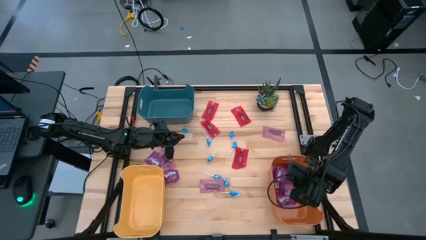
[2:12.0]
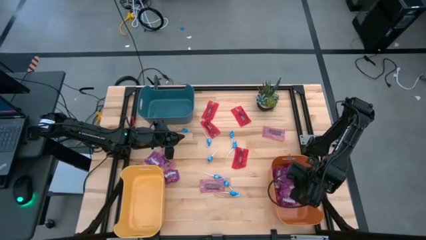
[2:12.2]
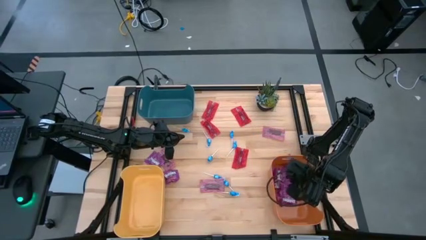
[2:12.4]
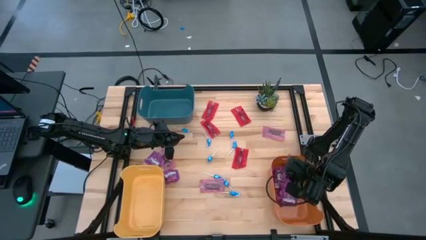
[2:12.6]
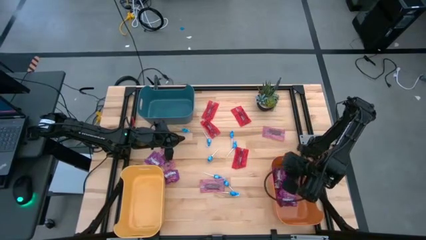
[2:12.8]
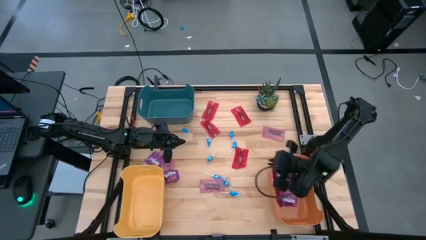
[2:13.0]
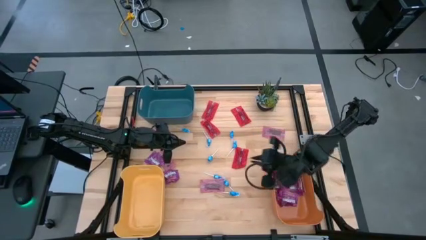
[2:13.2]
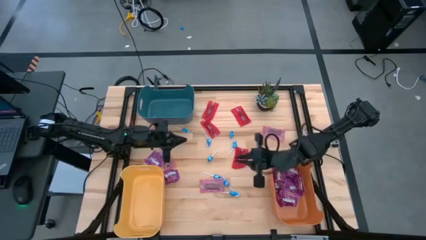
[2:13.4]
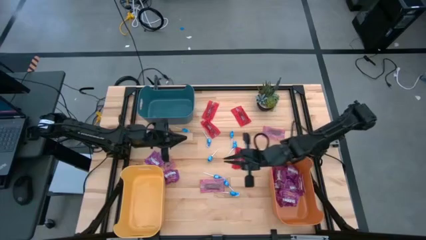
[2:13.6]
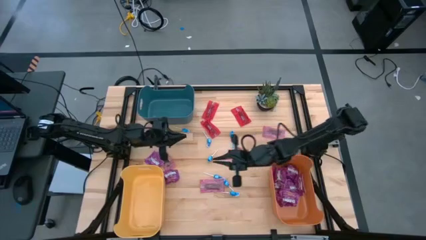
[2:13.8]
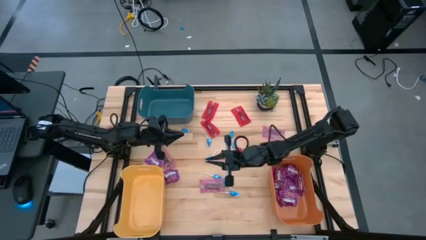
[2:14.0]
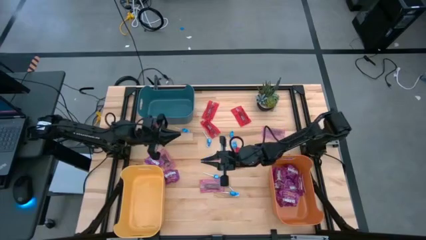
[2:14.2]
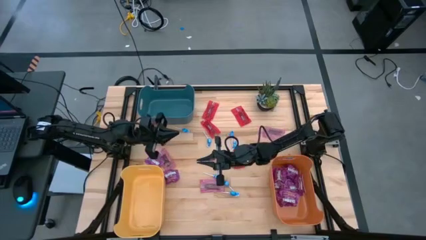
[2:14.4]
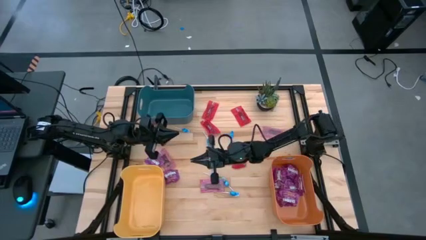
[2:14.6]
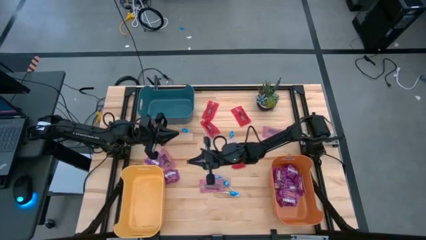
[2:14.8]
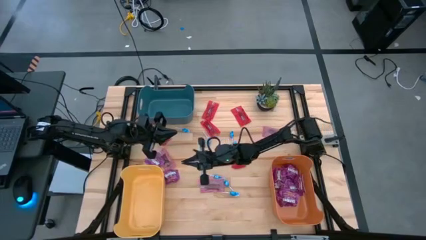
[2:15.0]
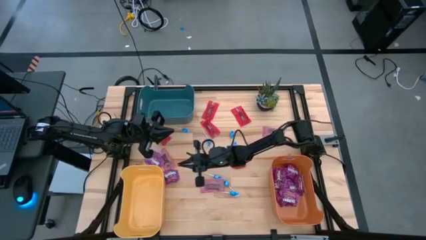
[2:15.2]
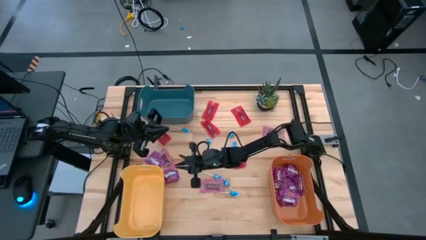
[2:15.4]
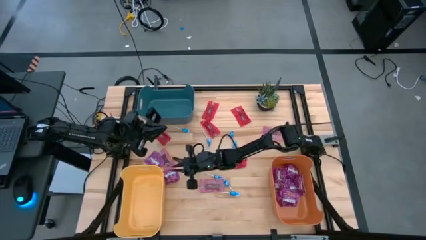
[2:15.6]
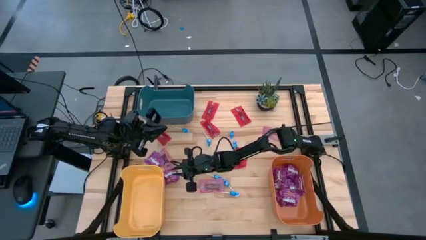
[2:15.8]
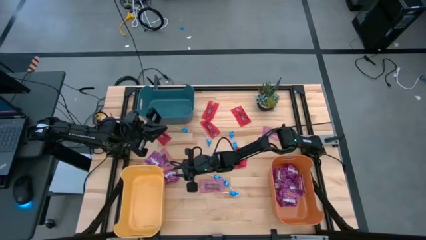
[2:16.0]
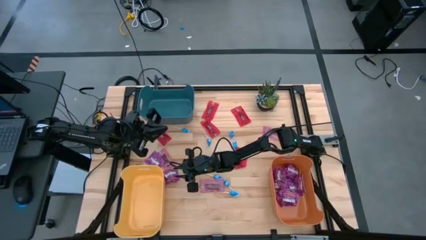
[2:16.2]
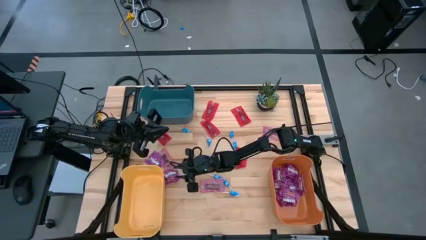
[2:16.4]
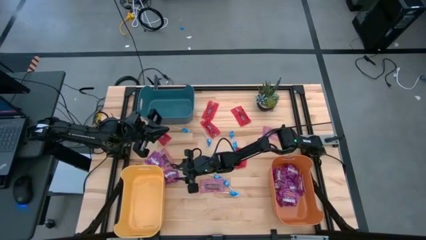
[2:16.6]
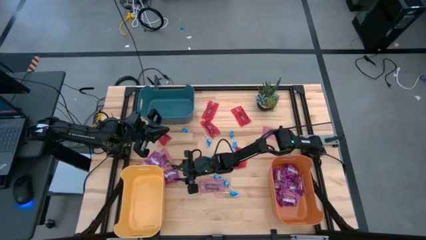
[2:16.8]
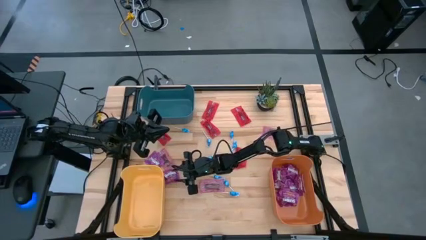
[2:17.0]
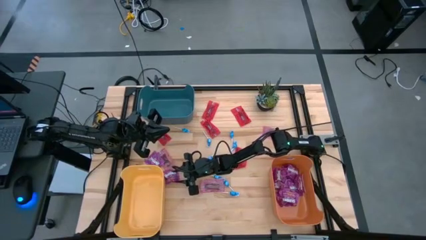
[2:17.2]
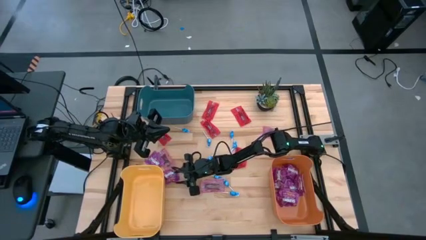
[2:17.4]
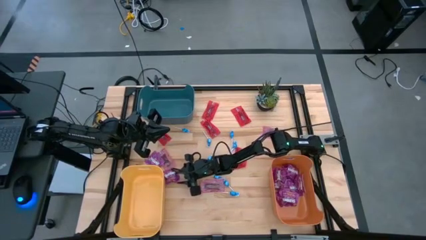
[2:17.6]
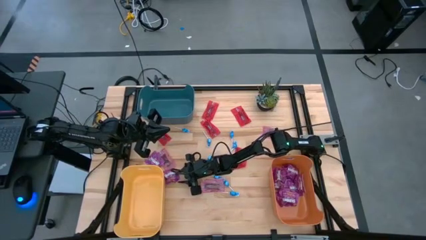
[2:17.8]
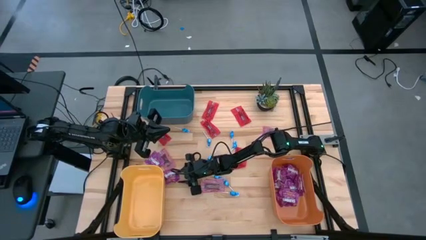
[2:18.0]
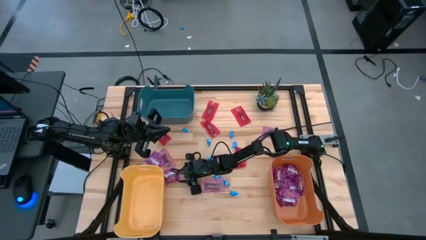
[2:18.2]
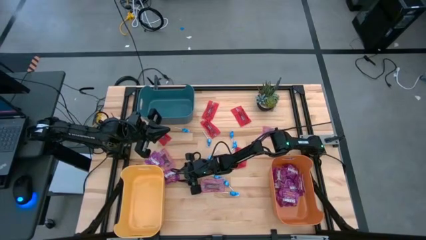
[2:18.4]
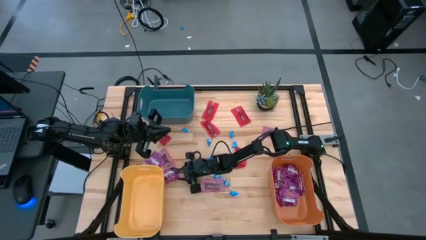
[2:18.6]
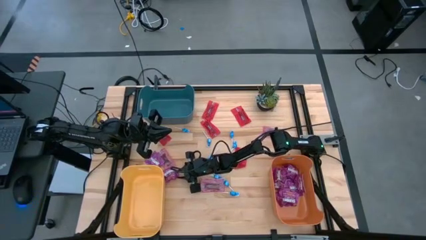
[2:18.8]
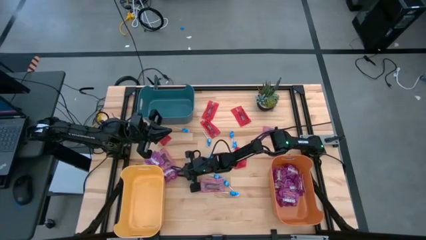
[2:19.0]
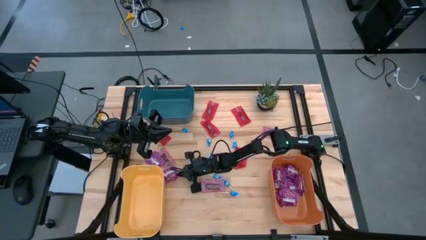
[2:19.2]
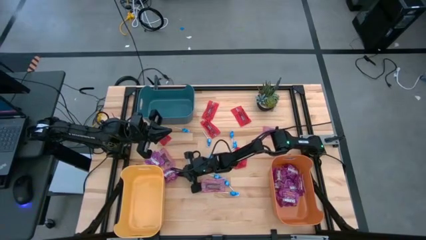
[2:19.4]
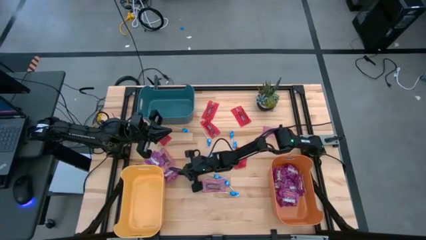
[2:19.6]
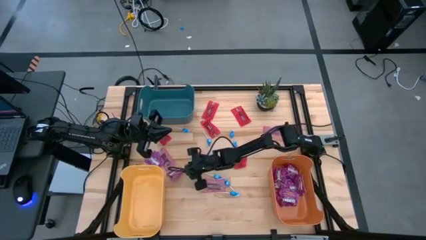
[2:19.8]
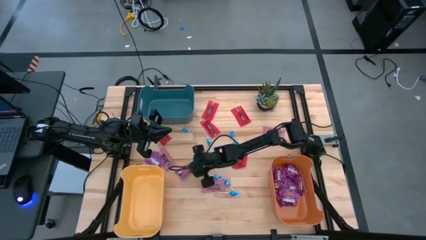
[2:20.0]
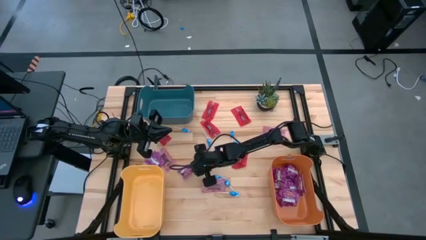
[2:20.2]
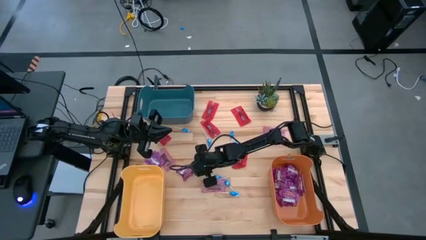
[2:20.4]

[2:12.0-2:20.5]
Task: Sort candy
Put the purple candy into the orange bin

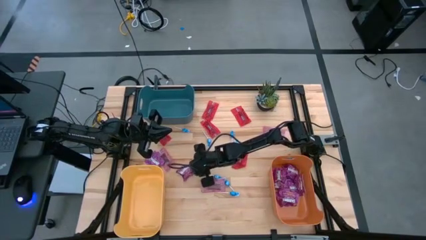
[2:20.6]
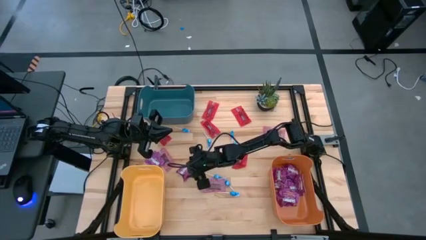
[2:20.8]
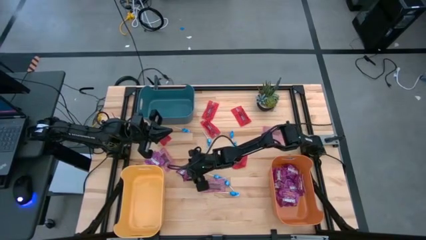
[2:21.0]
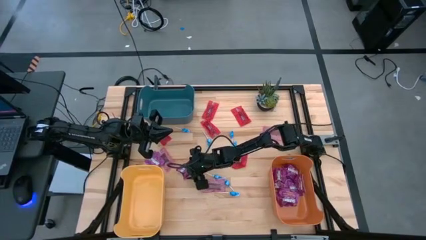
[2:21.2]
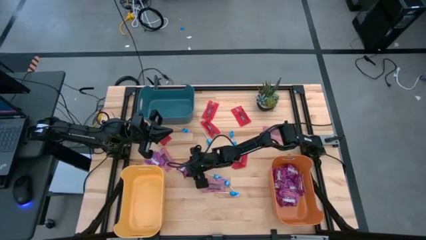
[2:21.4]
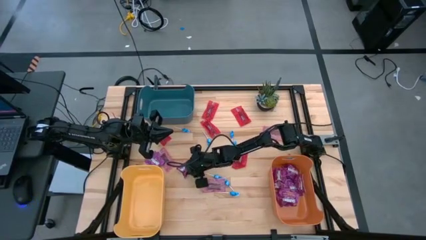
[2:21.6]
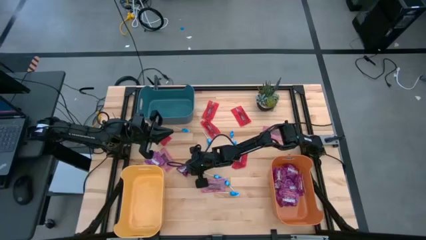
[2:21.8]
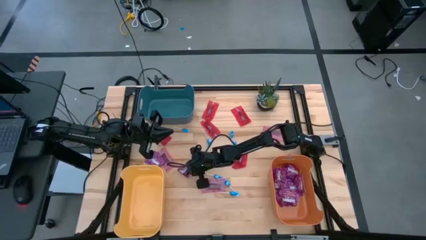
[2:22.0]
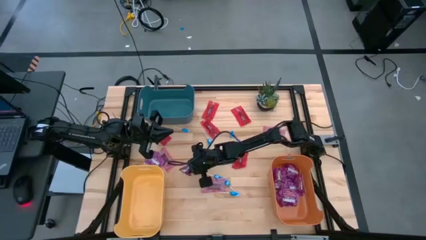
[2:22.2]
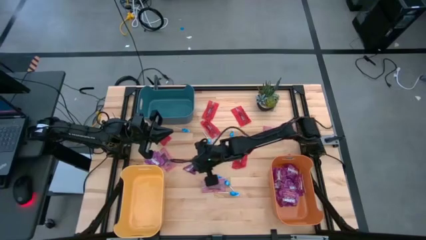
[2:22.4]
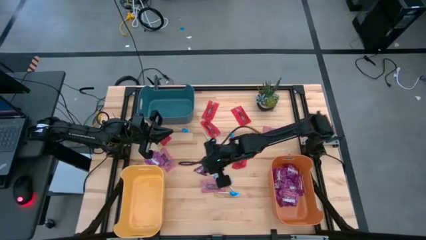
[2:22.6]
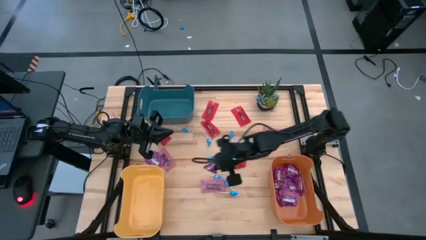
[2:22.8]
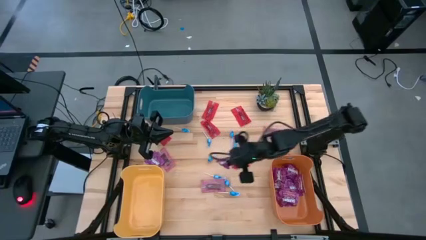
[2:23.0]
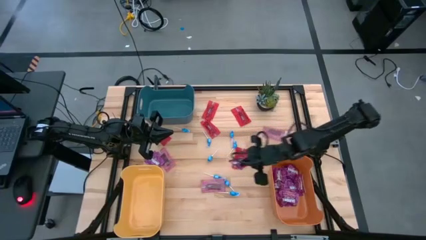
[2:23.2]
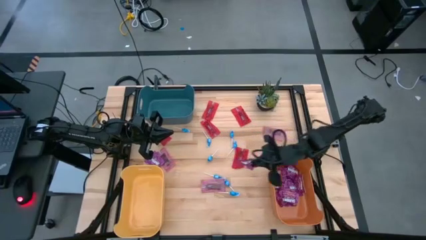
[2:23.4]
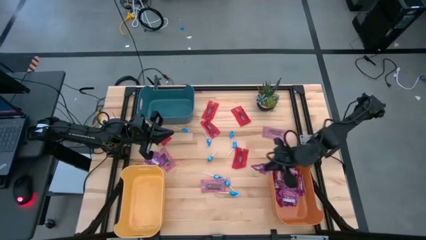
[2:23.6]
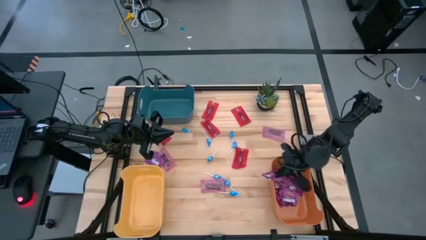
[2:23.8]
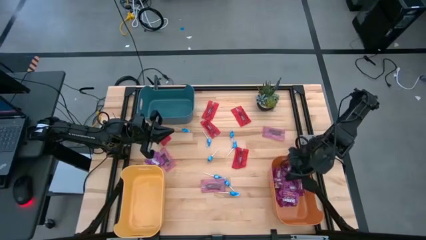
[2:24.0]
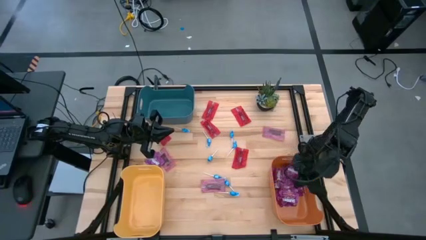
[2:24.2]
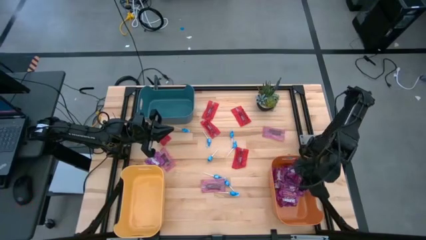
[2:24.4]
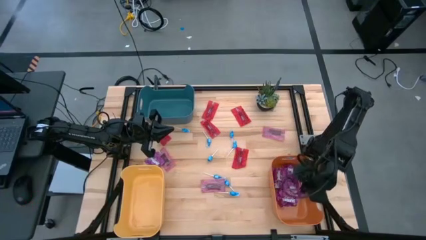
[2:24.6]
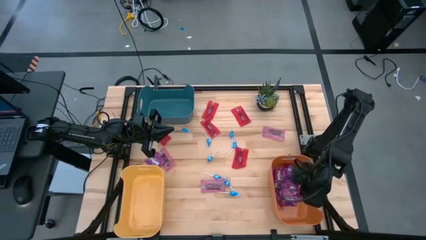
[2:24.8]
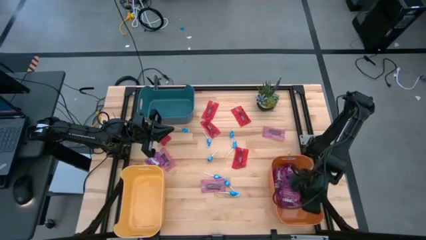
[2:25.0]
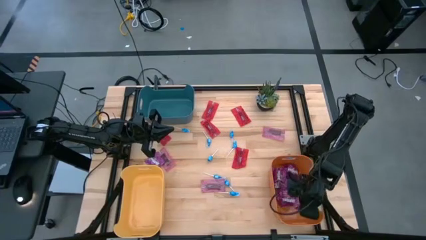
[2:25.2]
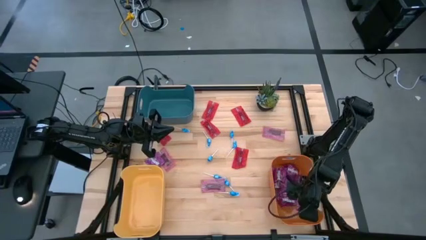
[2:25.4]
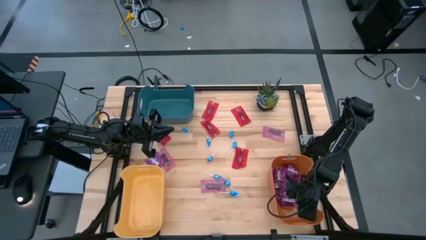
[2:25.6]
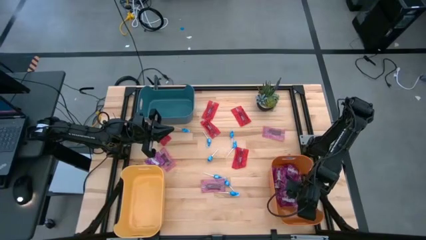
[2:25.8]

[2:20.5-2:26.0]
Put the purple candy into the orange bin

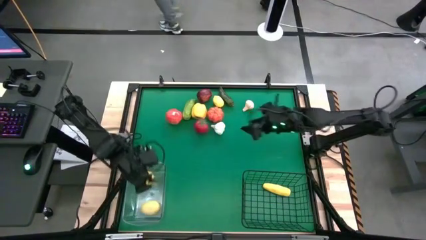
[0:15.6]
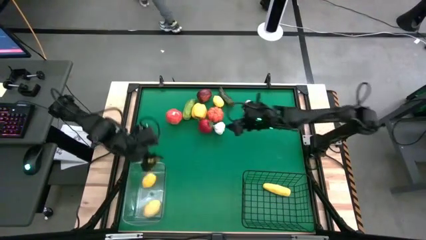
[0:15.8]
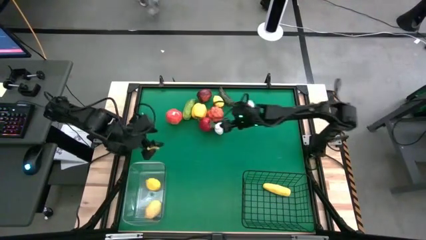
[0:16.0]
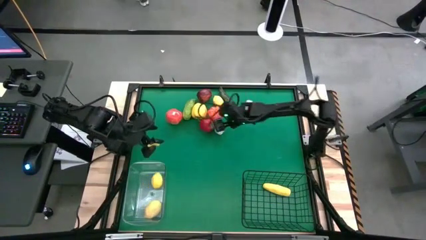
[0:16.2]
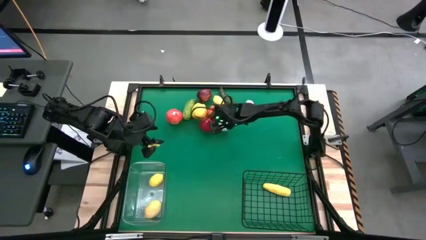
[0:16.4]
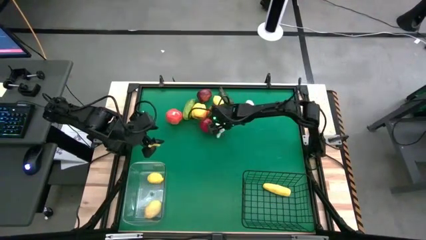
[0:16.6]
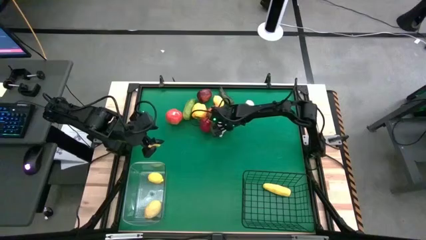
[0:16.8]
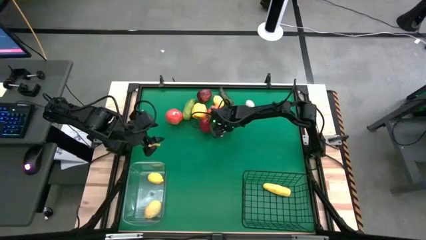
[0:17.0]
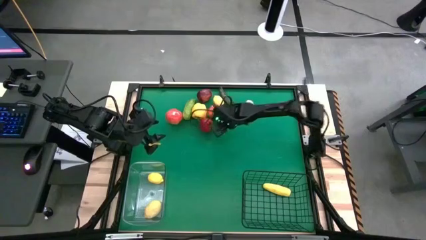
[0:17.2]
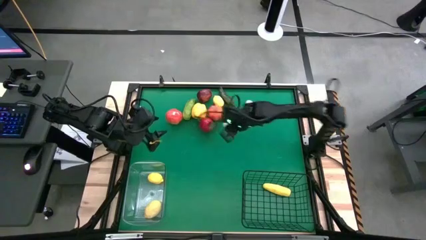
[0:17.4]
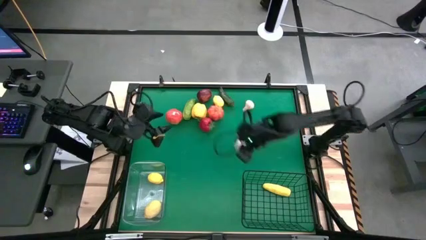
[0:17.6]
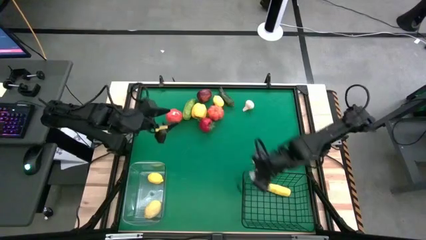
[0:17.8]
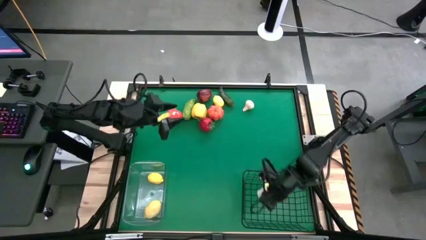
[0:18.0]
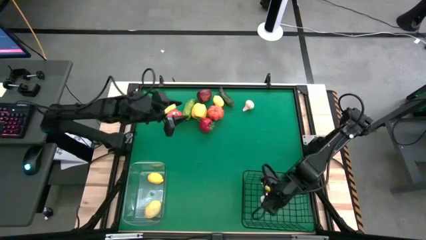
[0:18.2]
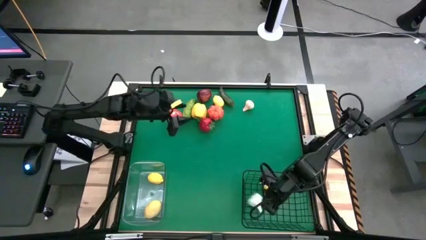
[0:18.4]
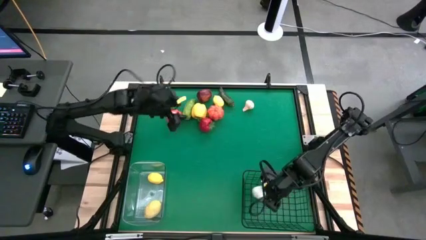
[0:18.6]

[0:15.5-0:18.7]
Task: Sort produce into baskets
Put the left garlic into the wire basket
